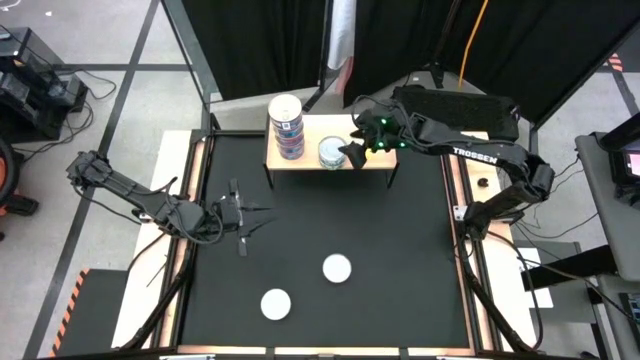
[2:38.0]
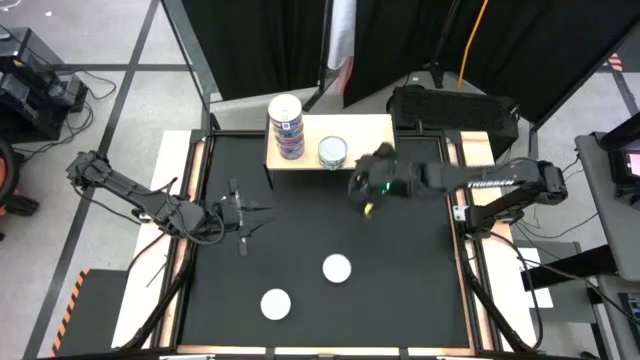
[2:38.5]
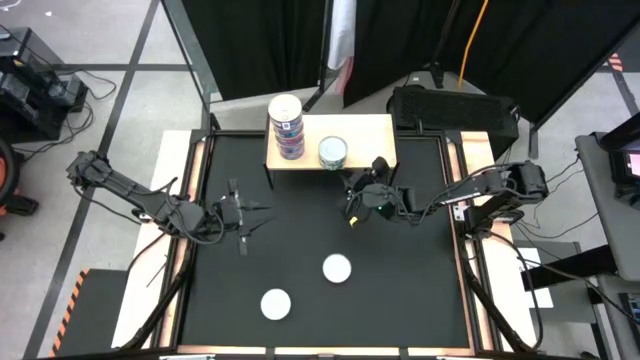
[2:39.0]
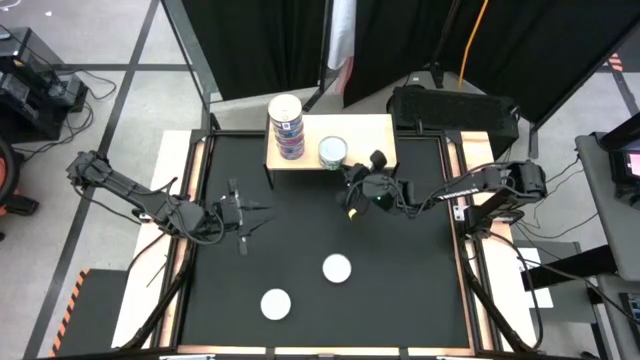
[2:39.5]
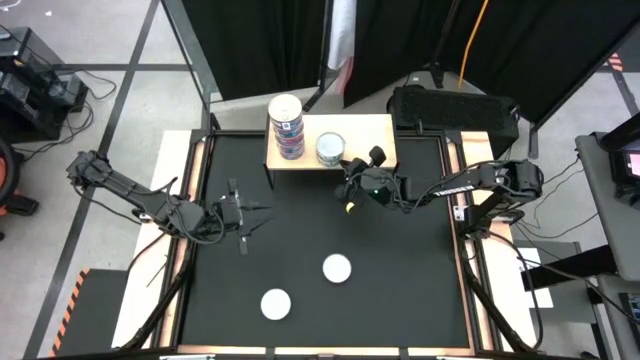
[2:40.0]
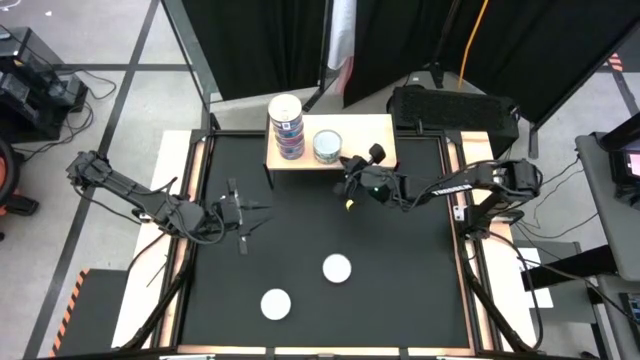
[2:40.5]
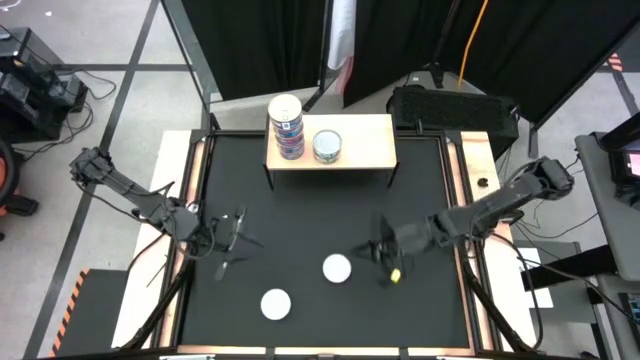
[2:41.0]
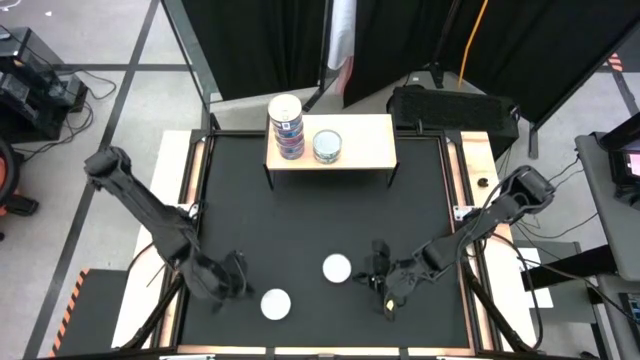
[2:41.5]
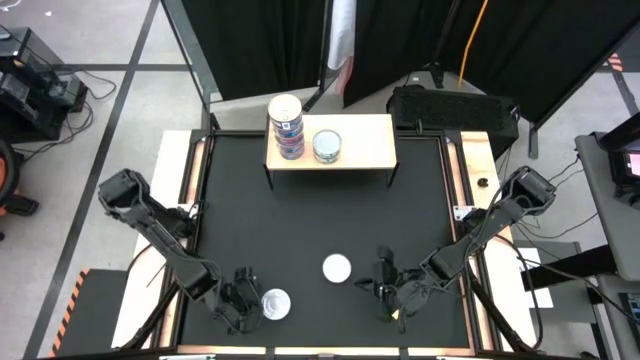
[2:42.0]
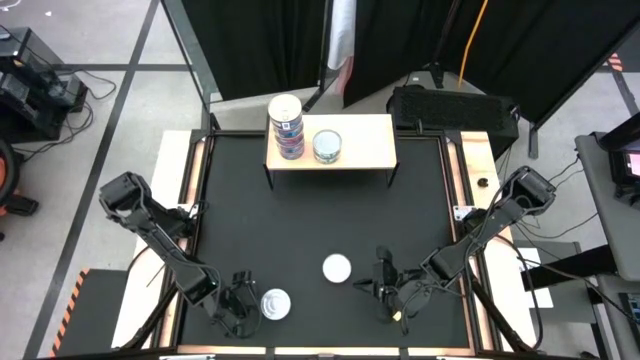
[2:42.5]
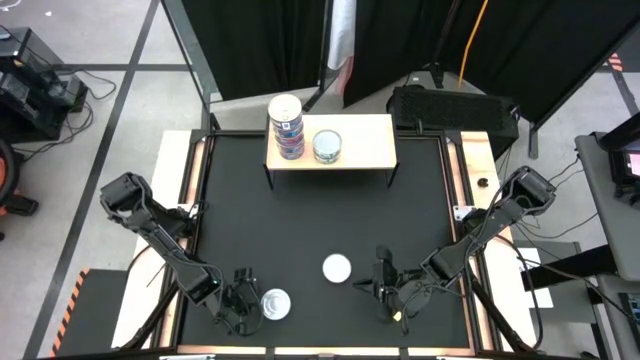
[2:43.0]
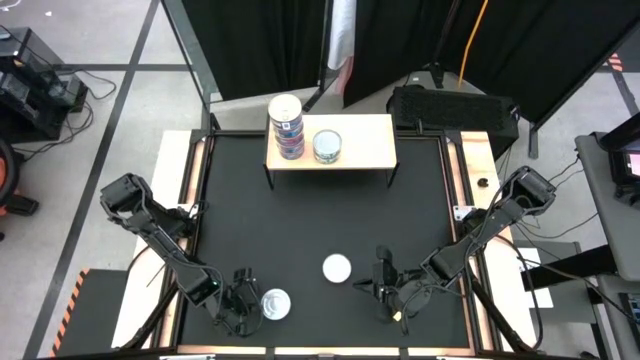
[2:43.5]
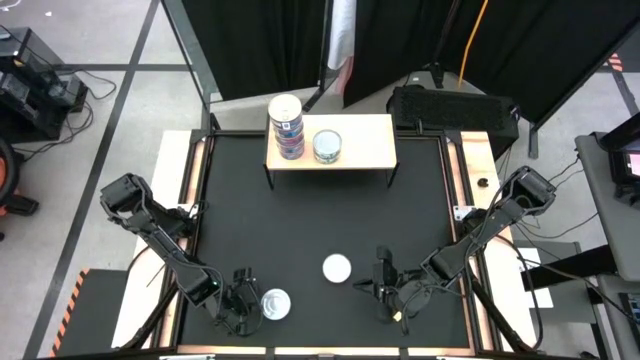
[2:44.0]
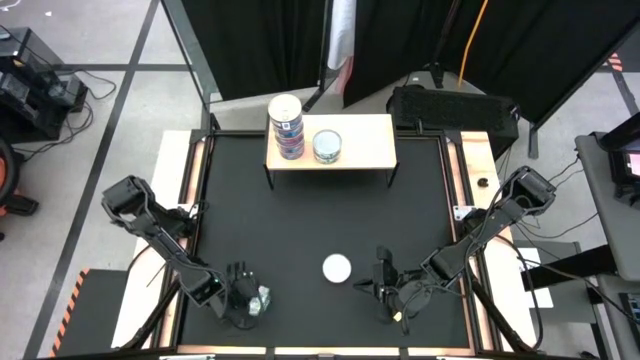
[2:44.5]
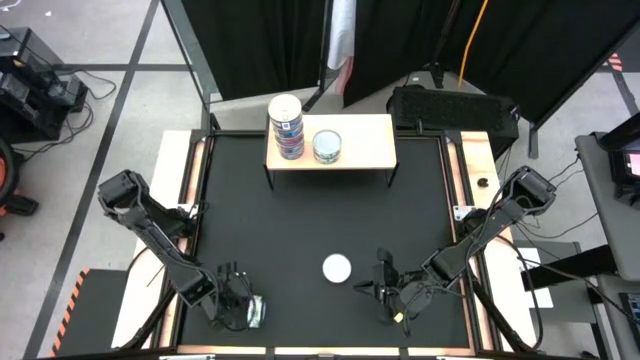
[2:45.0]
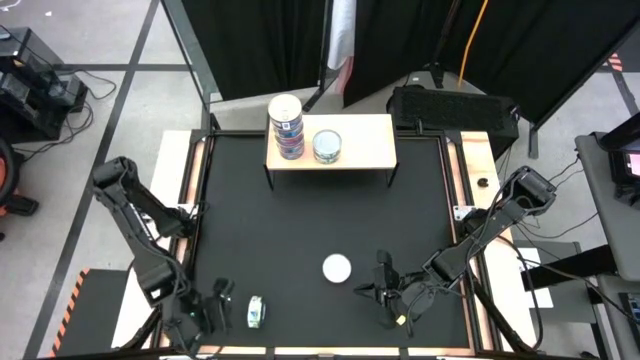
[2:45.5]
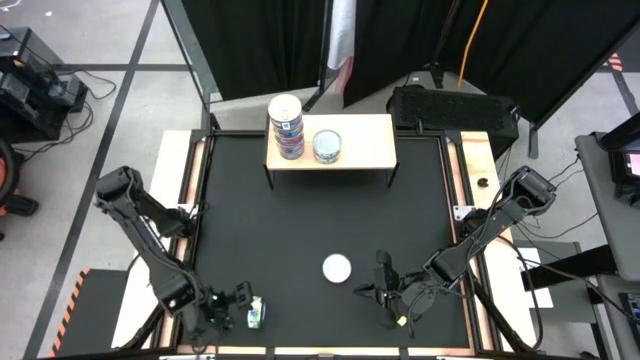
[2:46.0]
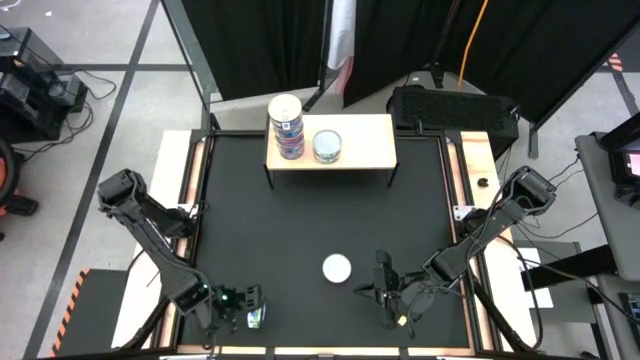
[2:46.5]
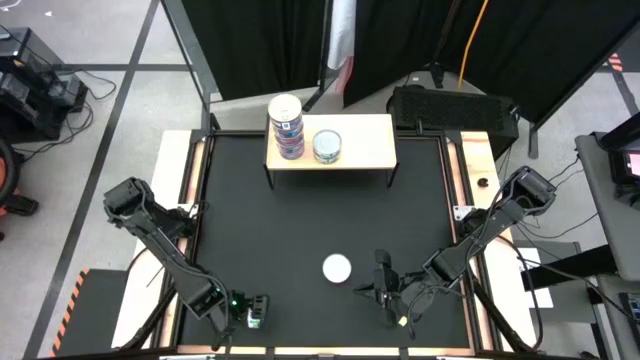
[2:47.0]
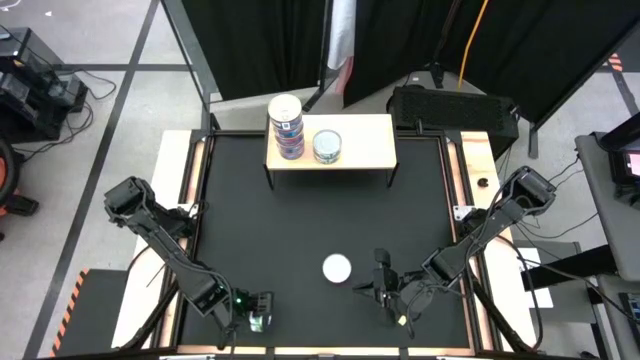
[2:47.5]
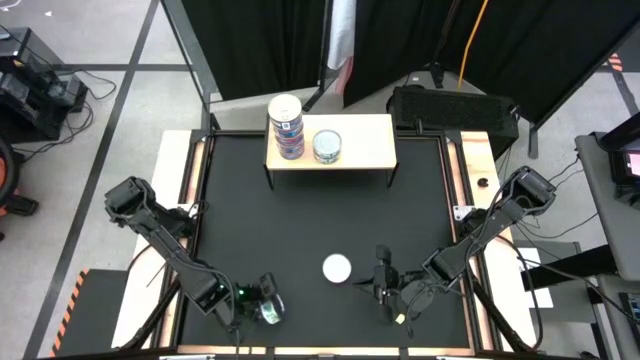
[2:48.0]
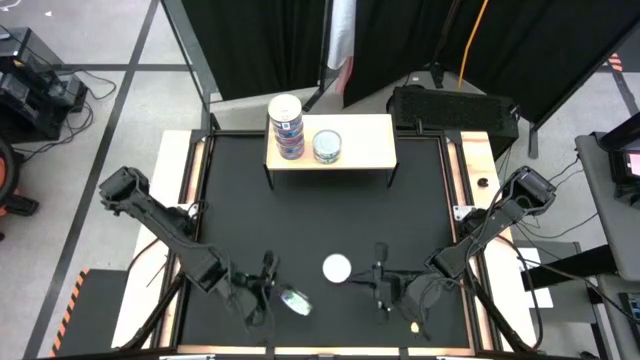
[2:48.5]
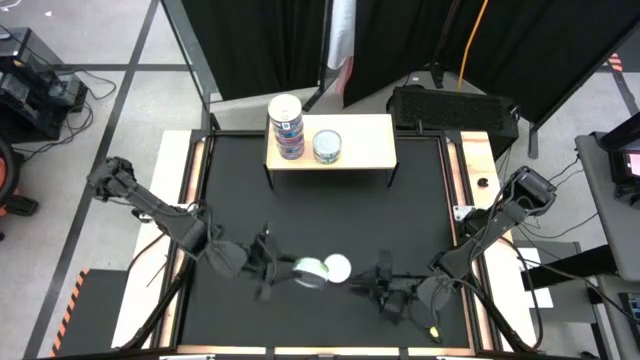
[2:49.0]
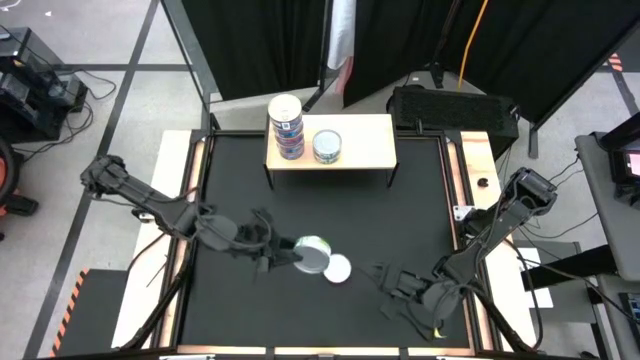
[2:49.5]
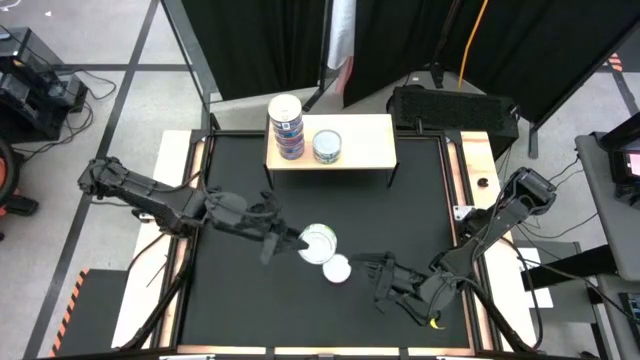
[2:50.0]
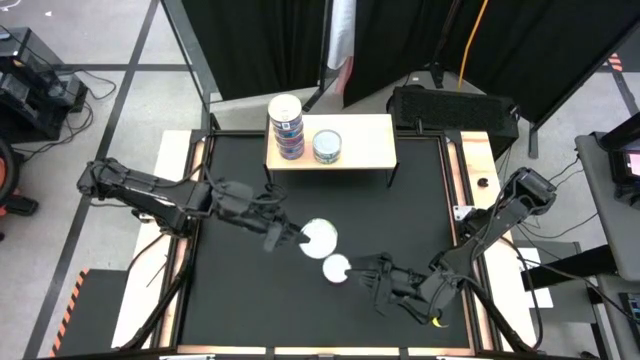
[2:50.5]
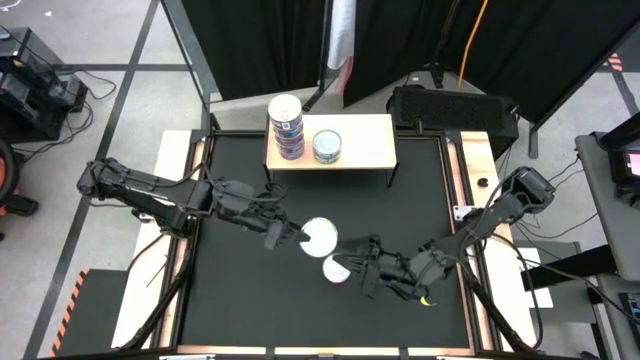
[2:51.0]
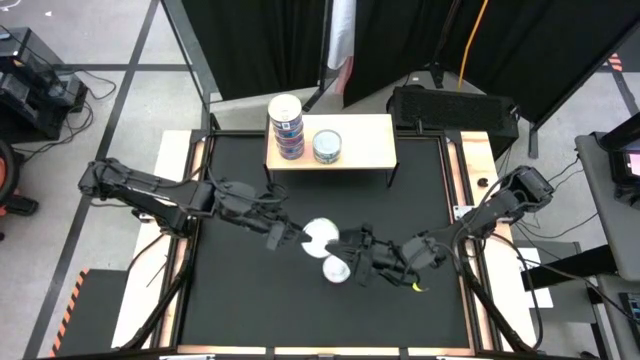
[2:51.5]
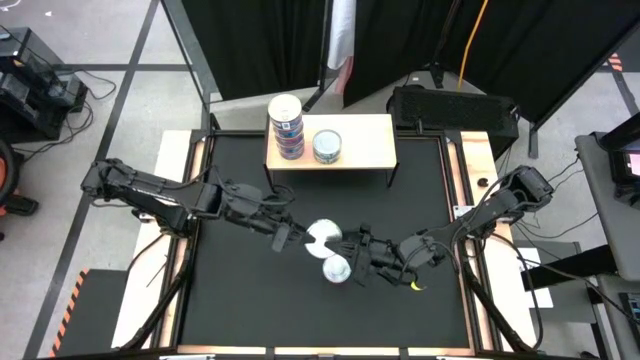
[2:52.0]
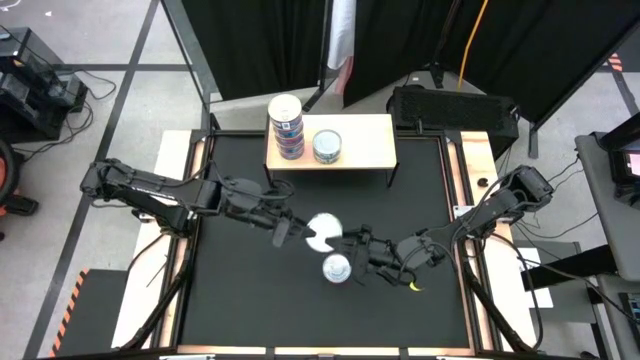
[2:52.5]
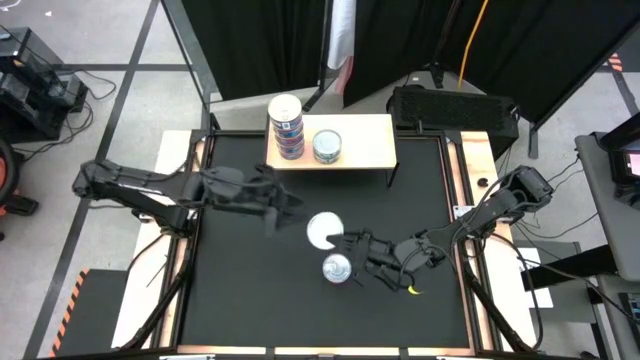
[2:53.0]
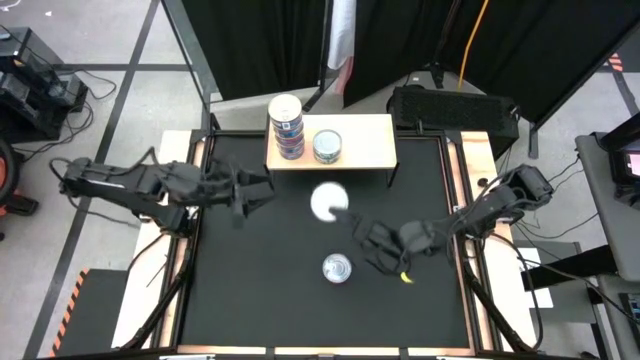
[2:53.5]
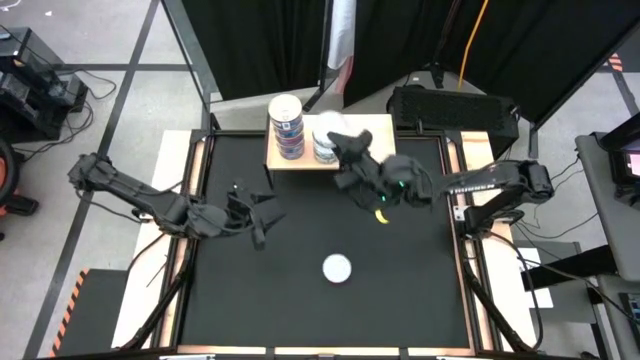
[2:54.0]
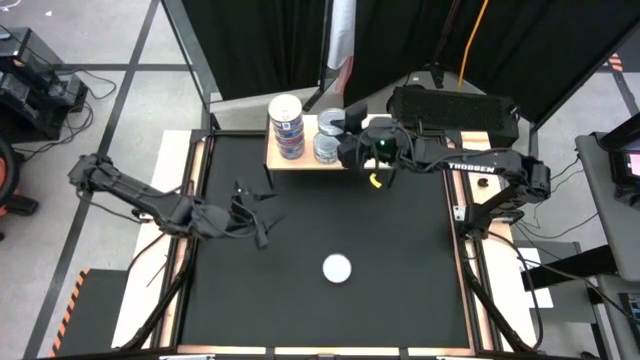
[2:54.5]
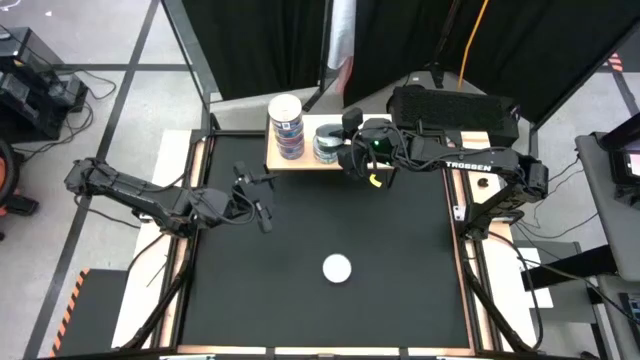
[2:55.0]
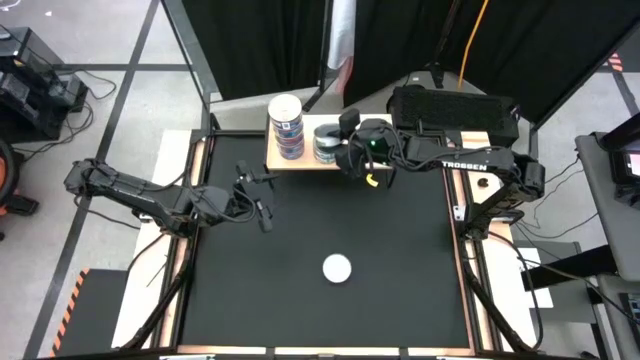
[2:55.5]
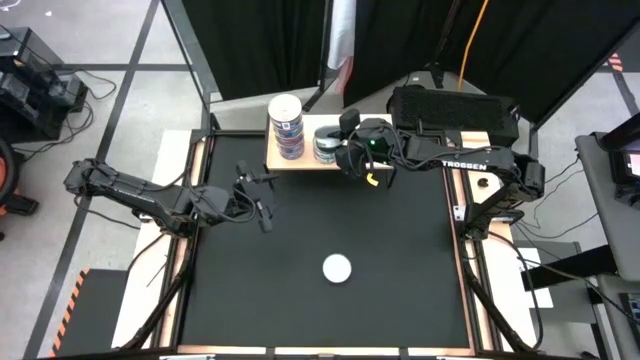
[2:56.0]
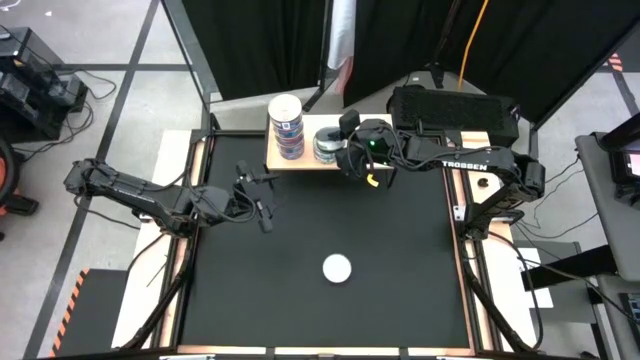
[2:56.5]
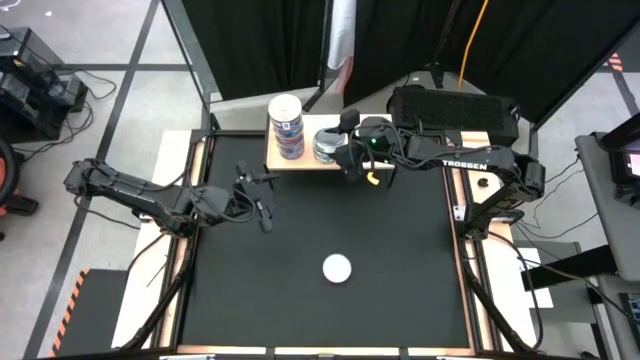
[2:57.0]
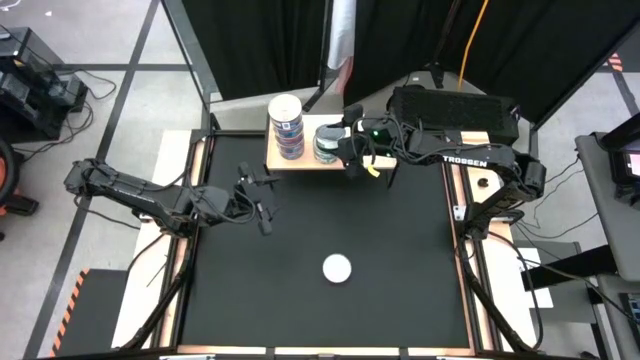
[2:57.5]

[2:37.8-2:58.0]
Task: Stack canned seafood by type on shelf
Stack the green tuna can on top of the other green tuna can on the shelf

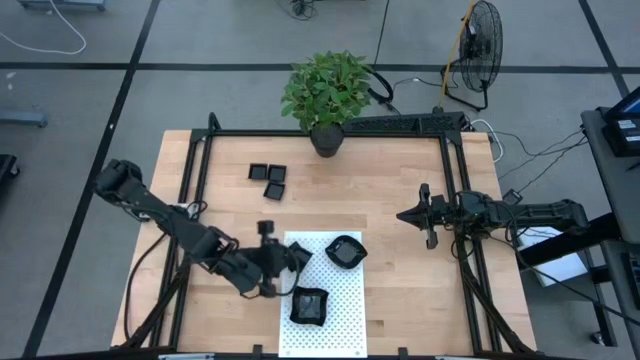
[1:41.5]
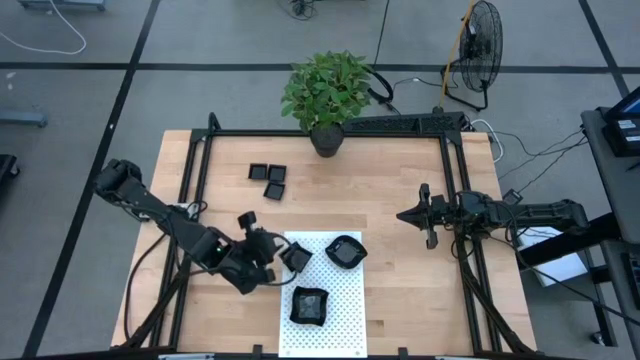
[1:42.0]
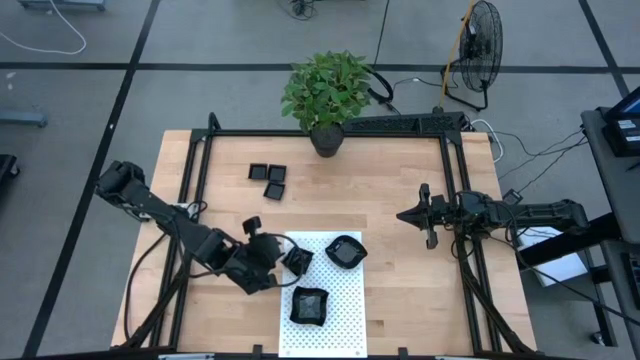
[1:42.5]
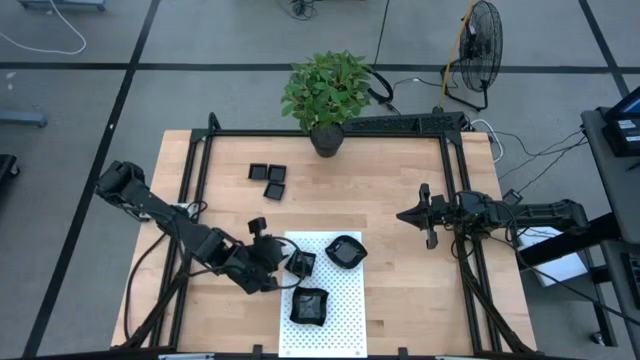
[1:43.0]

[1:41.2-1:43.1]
Task: Pick & Place Mini shaped plates
Adjust the square plates on the shelf
